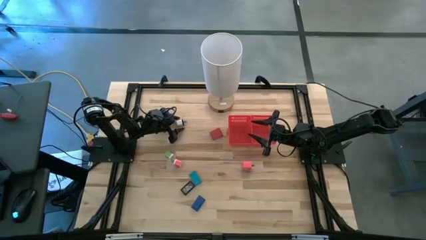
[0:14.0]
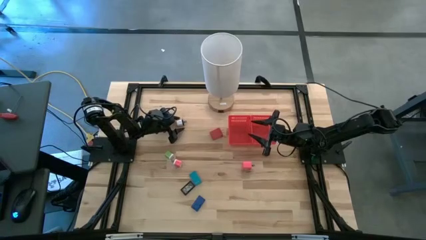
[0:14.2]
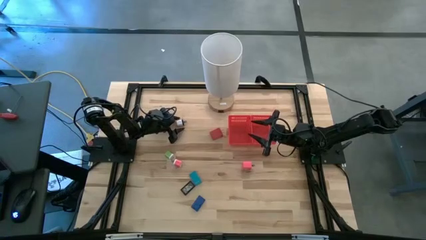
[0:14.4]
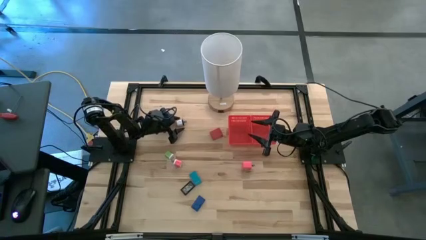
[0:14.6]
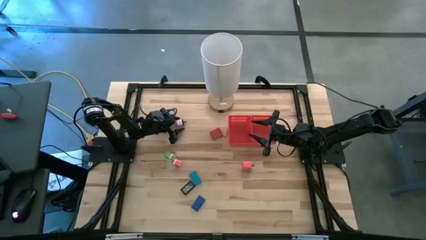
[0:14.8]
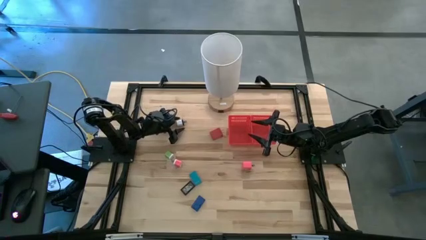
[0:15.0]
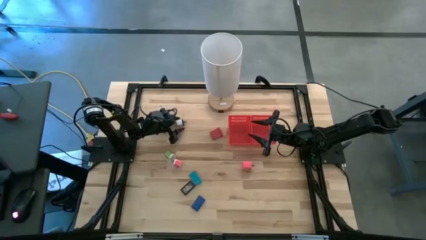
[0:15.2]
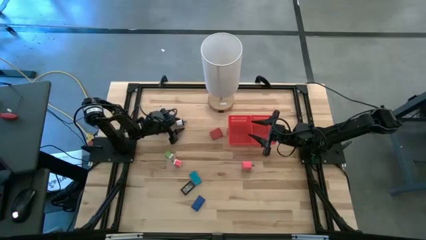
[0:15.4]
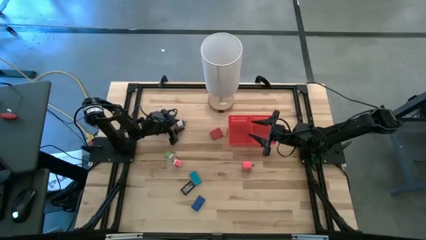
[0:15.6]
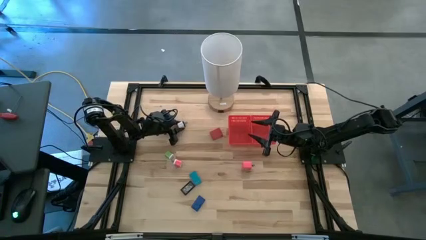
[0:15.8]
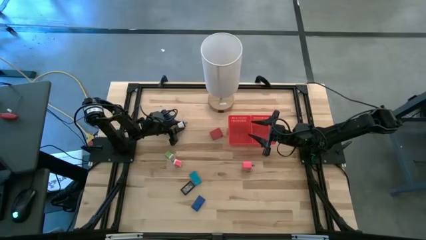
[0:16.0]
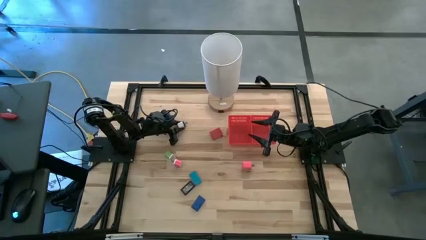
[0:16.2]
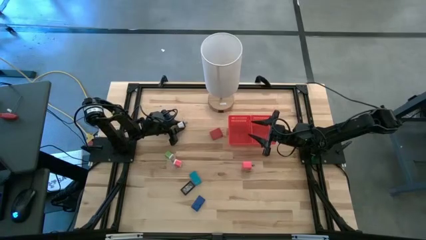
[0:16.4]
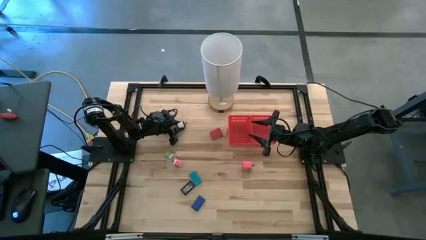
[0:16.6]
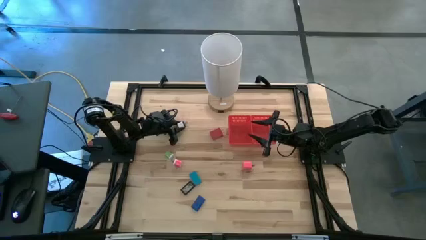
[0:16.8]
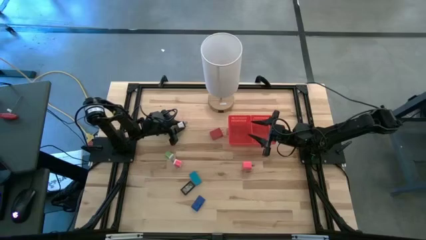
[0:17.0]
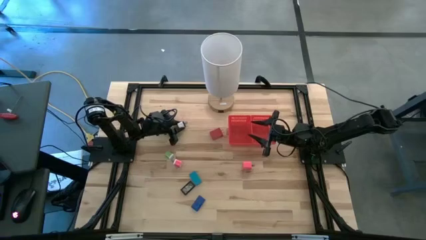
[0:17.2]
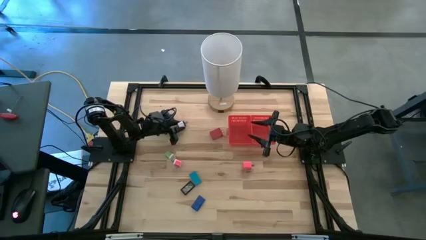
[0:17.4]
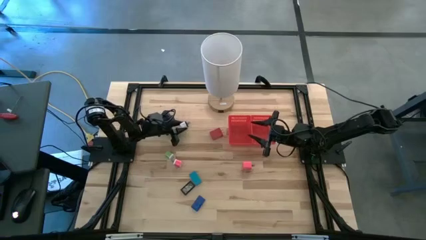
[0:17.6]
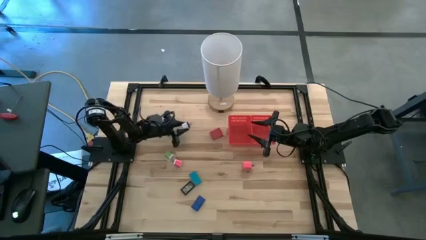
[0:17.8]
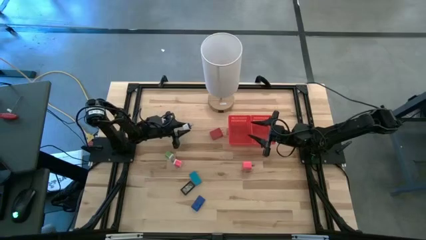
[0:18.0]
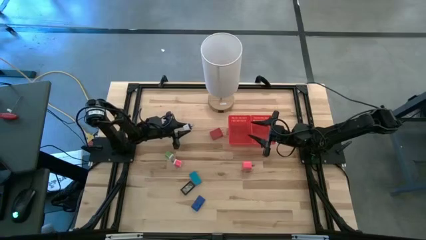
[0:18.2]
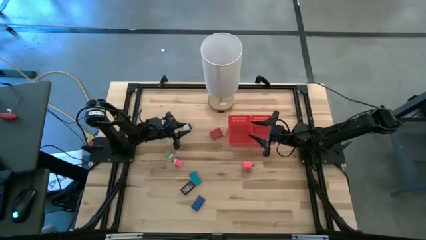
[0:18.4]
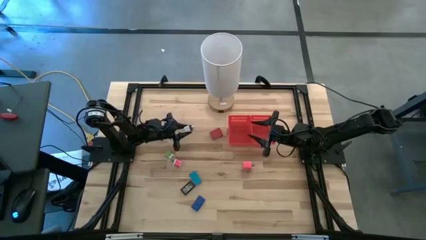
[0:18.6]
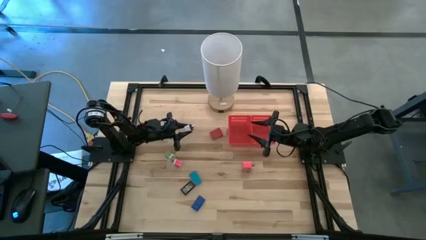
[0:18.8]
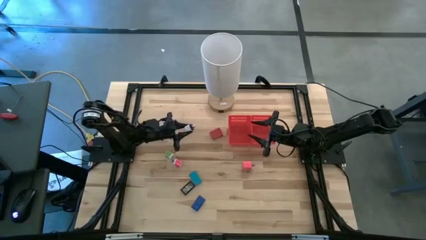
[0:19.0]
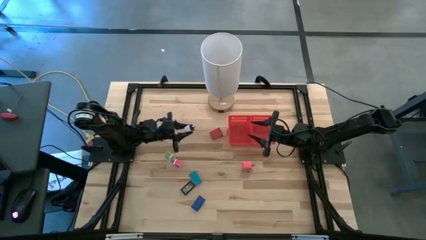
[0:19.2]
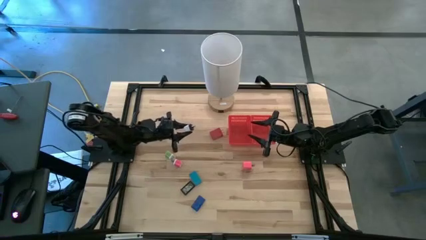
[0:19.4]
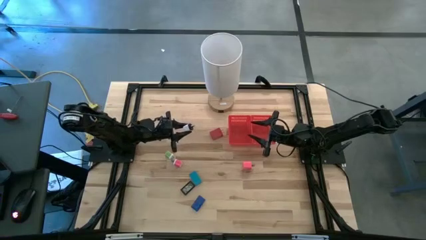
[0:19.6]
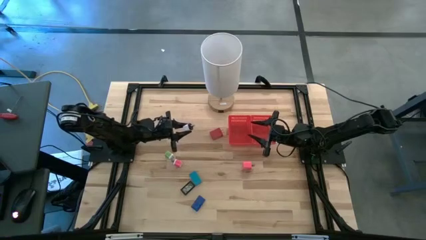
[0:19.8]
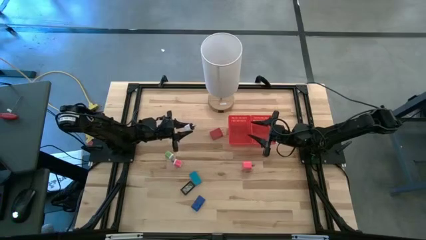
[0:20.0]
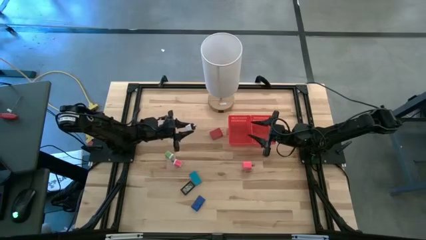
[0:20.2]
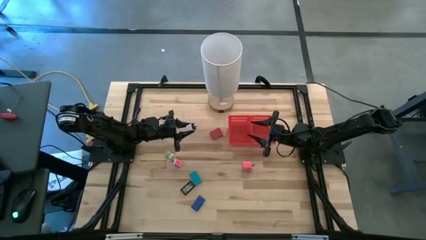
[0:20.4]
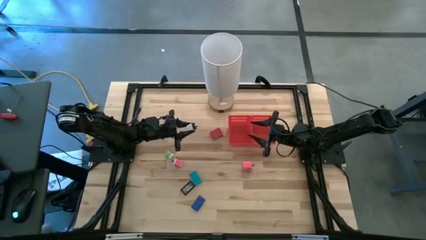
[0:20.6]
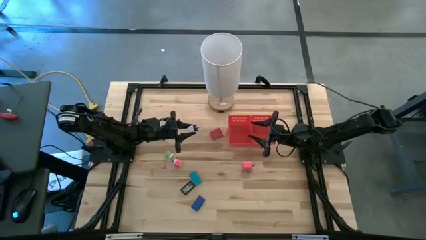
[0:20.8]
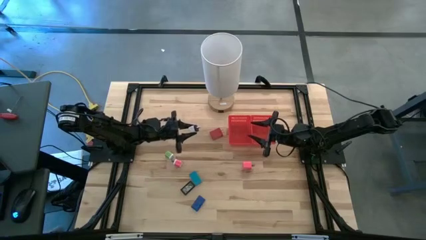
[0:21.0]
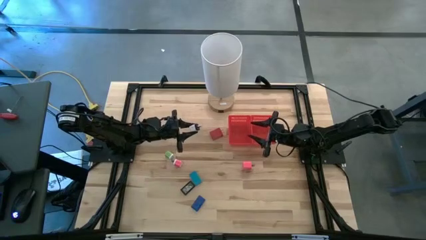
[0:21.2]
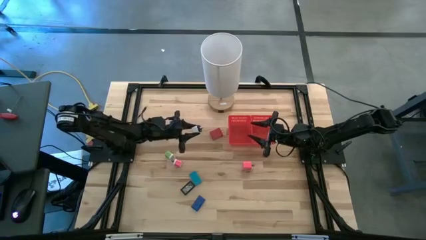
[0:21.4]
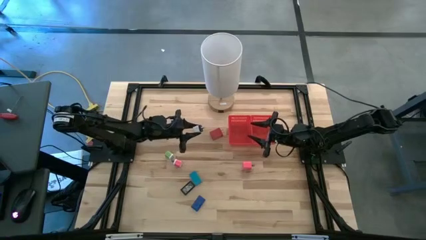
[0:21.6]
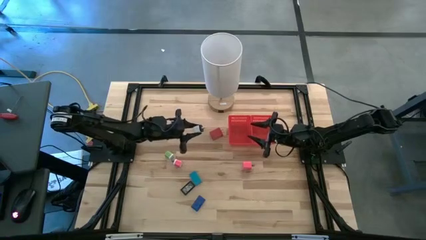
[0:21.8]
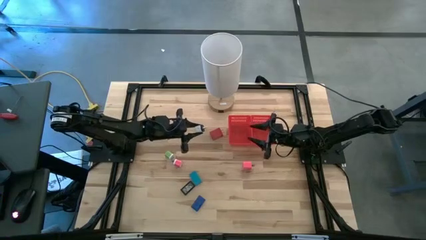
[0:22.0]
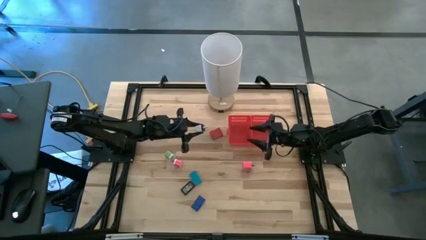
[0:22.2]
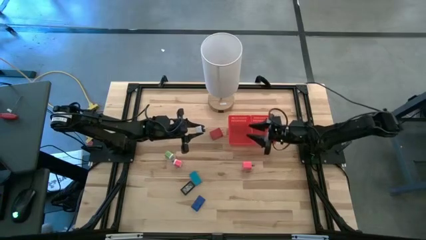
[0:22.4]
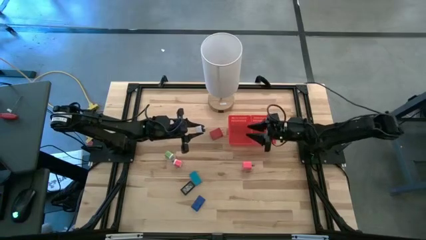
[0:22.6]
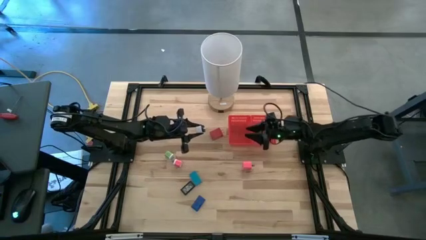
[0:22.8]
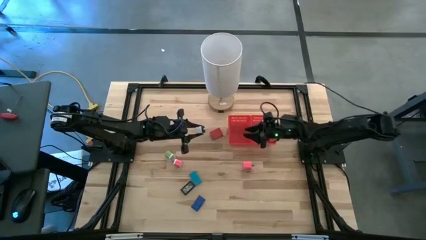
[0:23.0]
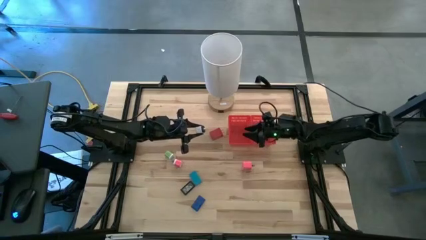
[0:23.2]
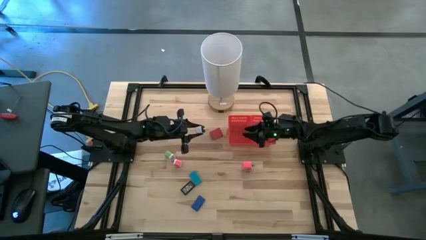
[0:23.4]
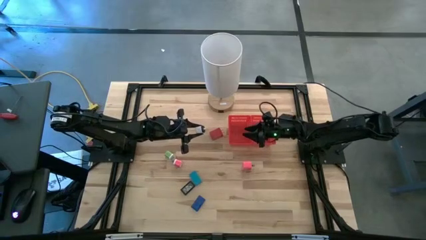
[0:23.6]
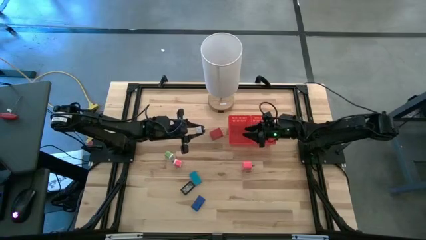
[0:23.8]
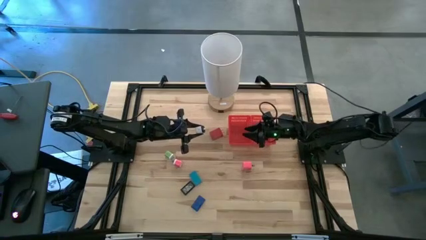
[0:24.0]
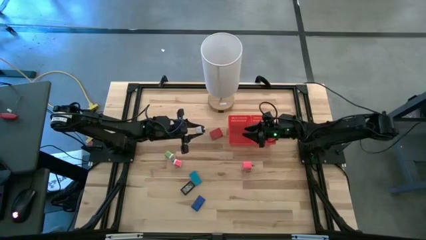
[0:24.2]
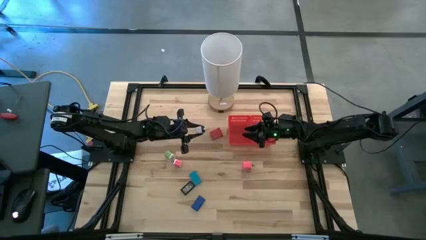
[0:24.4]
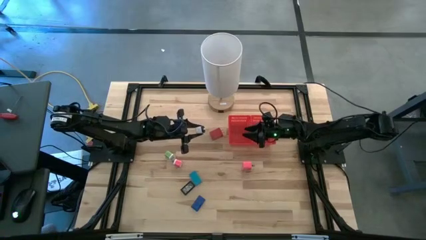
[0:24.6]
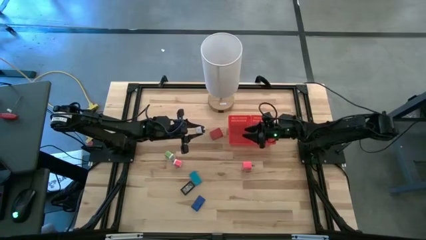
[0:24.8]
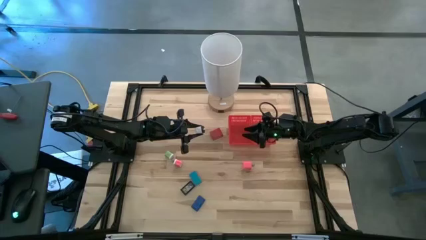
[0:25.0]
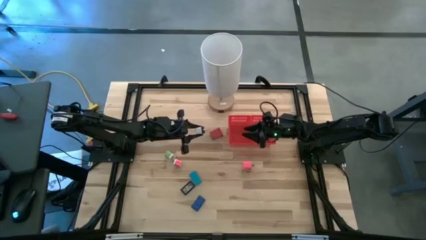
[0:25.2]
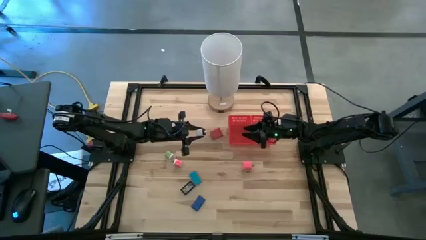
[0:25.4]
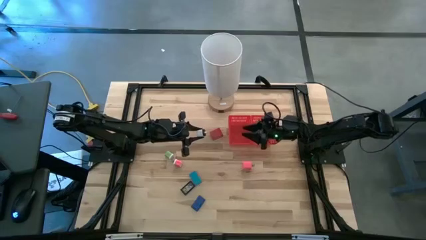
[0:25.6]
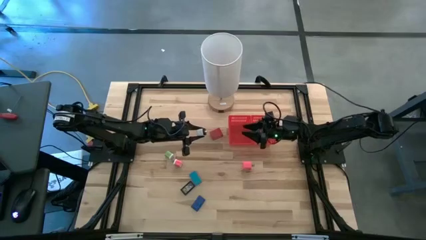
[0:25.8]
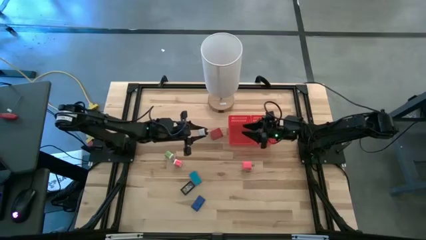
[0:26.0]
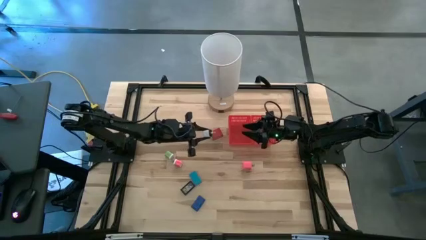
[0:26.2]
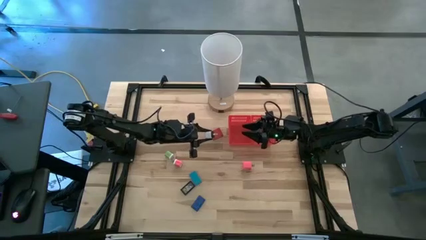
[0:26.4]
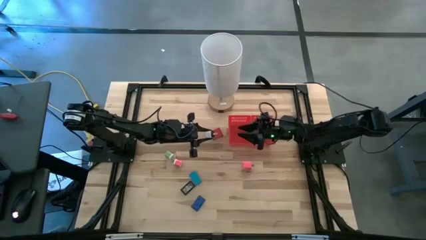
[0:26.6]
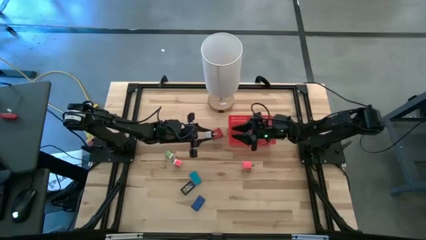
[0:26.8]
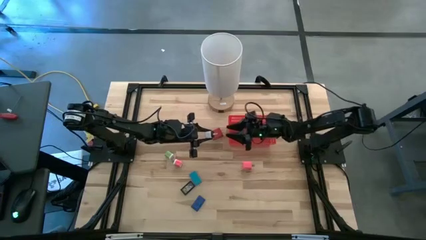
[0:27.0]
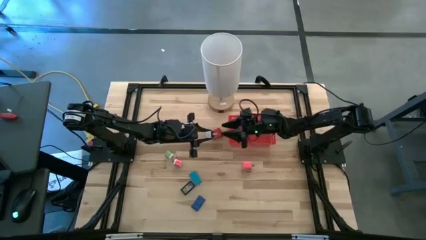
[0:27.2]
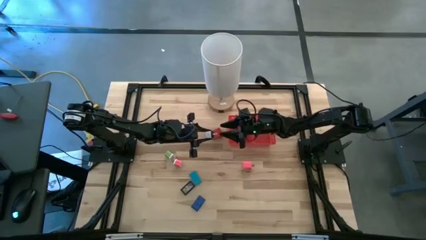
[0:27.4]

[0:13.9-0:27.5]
Task: Pick & Place Office items
Put the white charger adapter into the right red bin

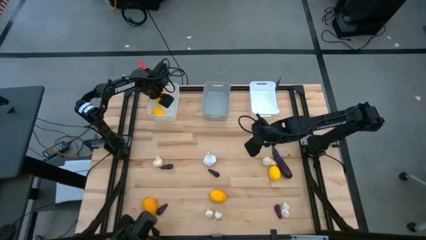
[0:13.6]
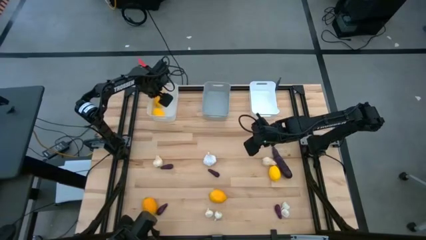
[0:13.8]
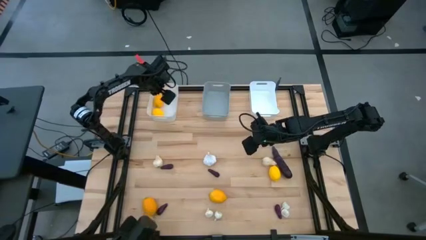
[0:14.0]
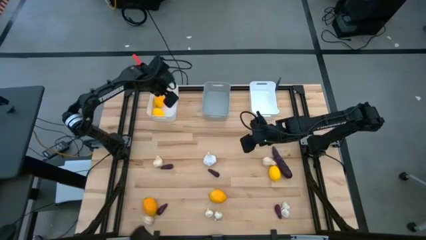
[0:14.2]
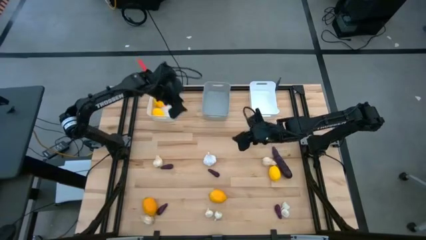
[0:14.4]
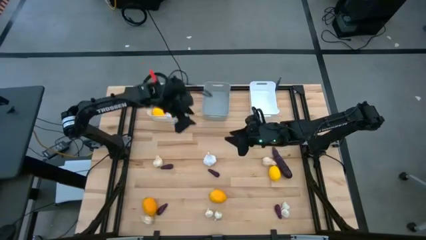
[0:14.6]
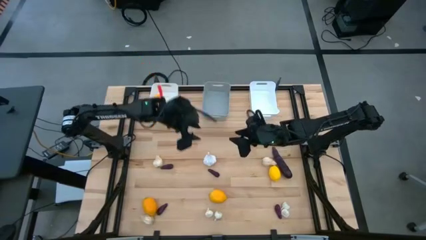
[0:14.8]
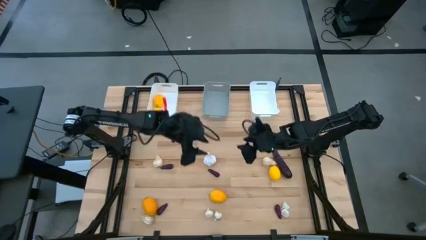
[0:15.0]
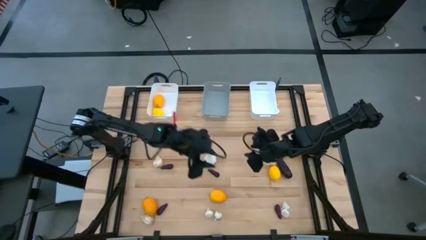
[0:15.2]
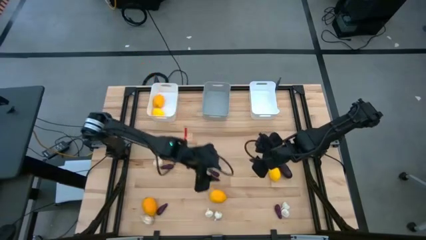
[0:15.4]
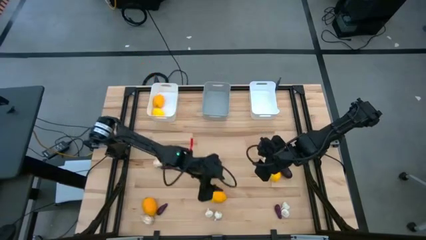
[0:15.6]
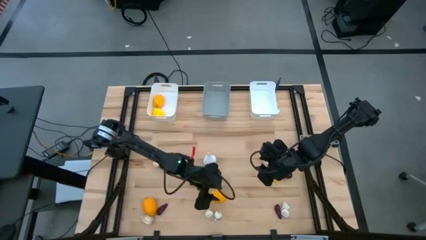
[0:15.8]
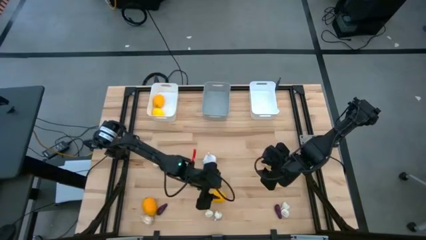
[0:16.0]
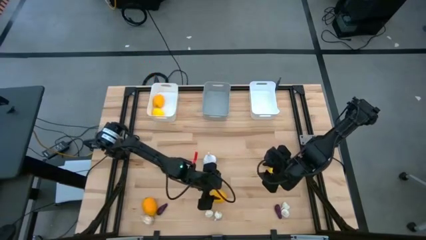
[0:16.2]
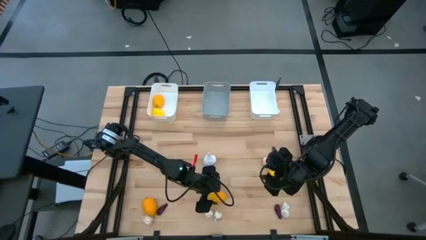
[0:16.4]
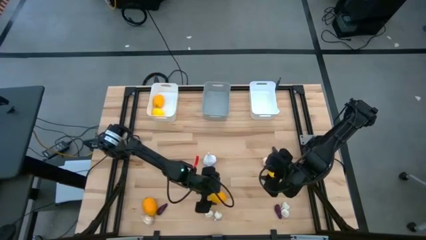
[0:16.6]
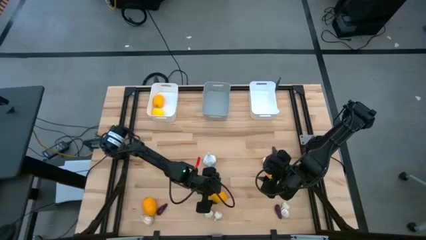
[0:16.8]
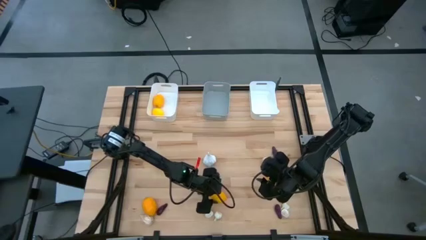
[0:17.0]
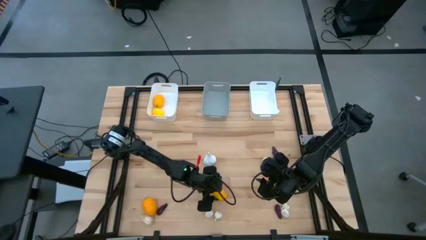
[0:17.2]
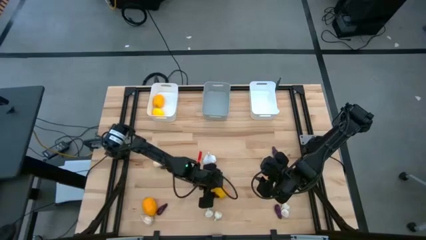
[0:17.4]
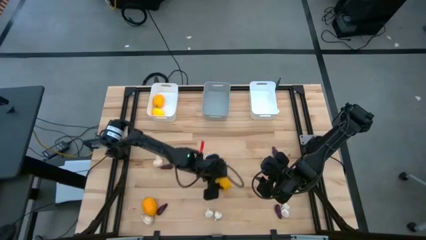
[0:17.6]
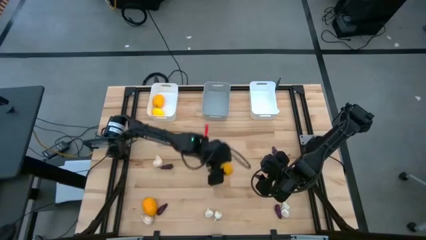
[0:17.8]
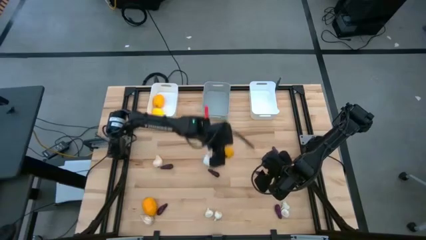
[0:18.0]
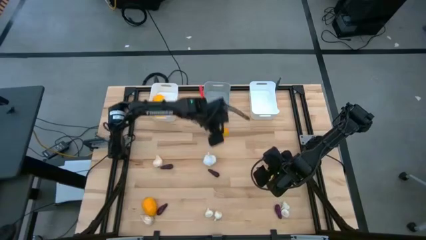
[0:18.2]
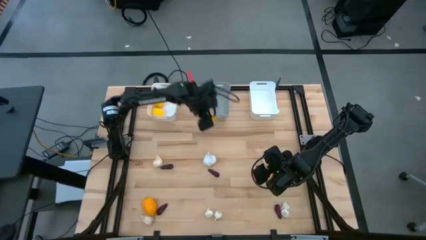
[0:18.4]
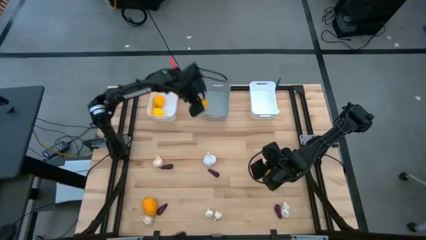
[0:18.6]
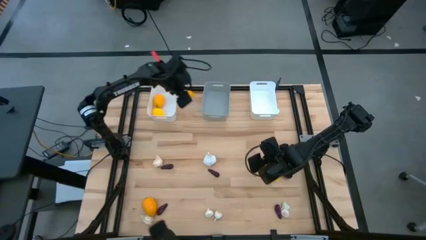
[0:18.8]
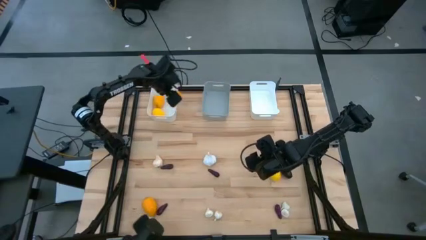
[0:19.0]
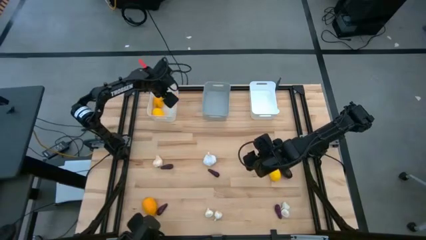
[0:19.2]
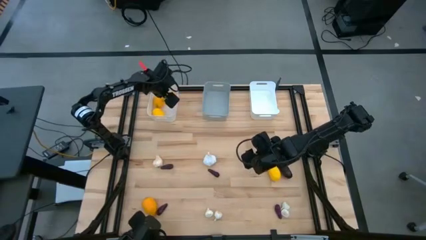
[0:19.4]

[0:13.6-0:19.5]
Task: Sort produce into baskets
Put the lemon into the left white bin
